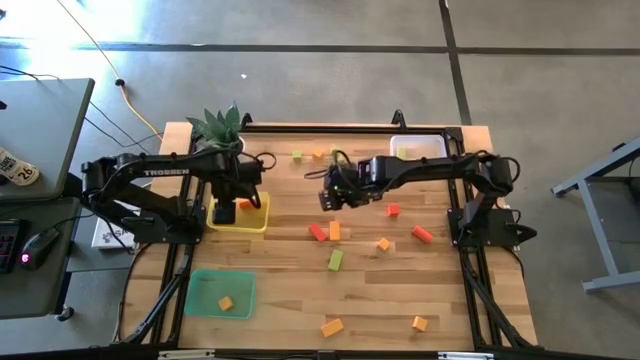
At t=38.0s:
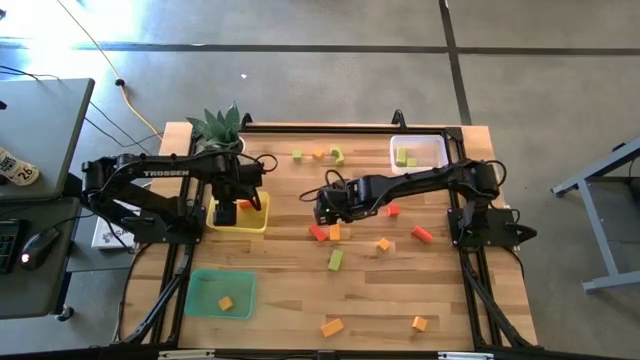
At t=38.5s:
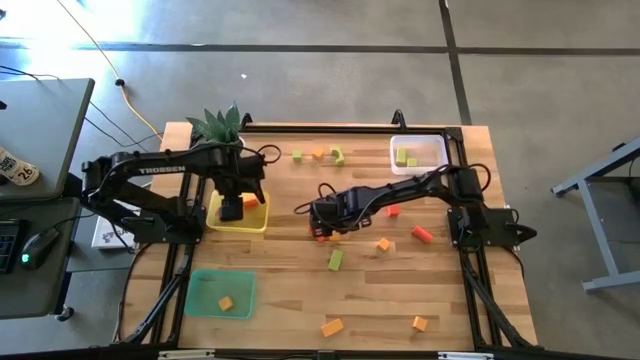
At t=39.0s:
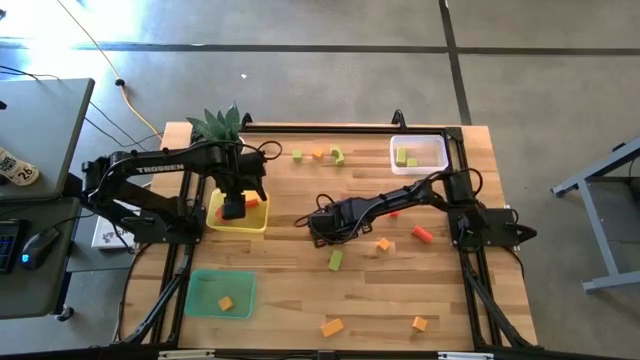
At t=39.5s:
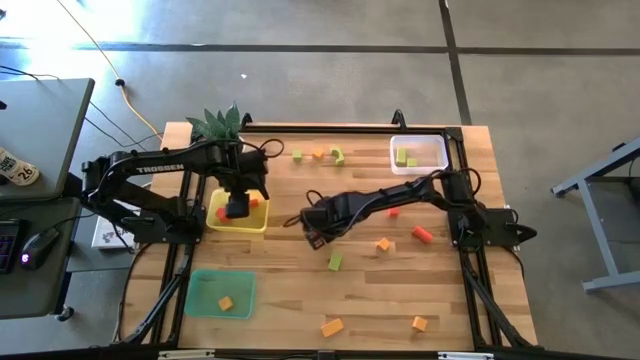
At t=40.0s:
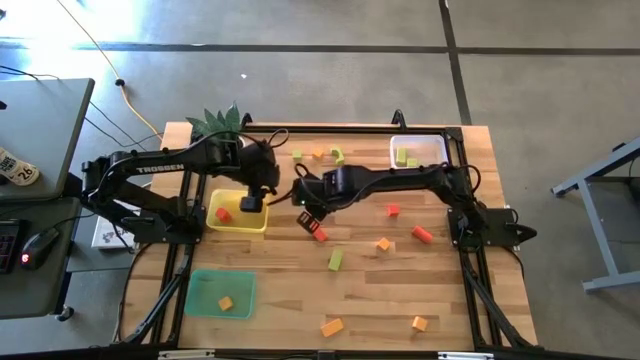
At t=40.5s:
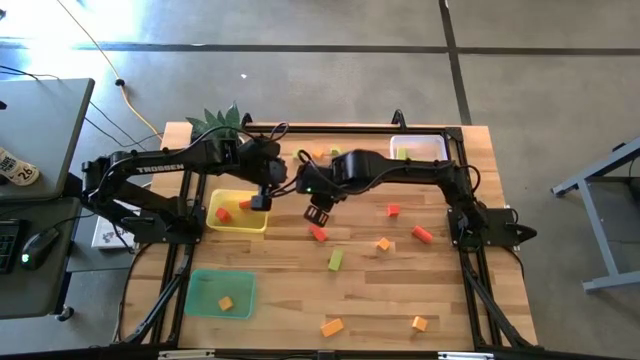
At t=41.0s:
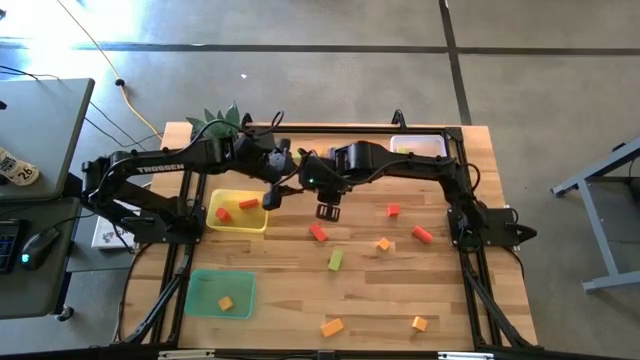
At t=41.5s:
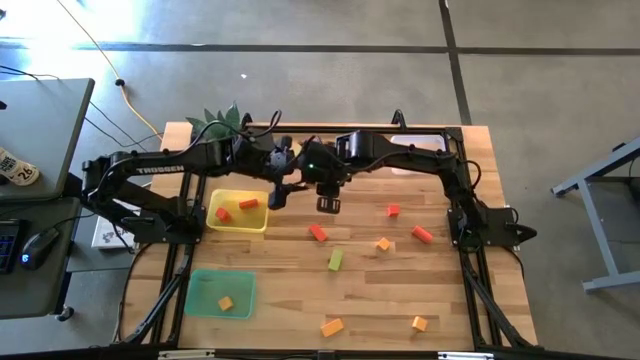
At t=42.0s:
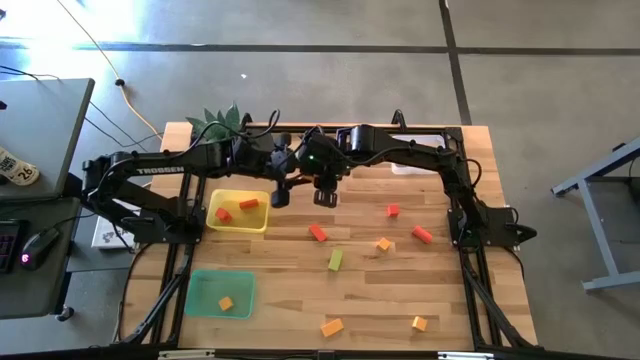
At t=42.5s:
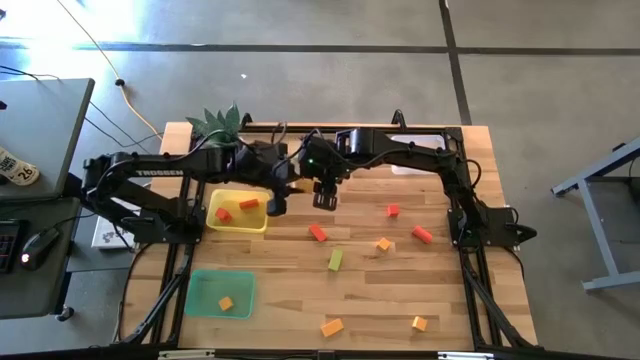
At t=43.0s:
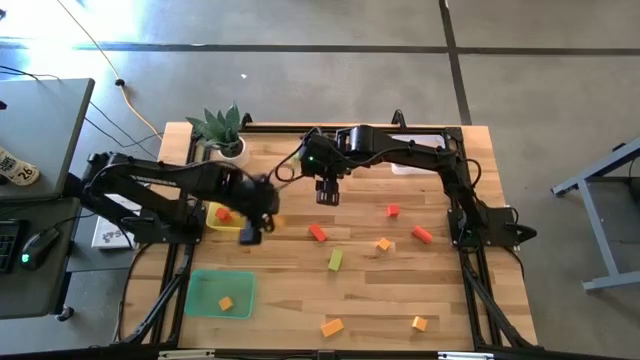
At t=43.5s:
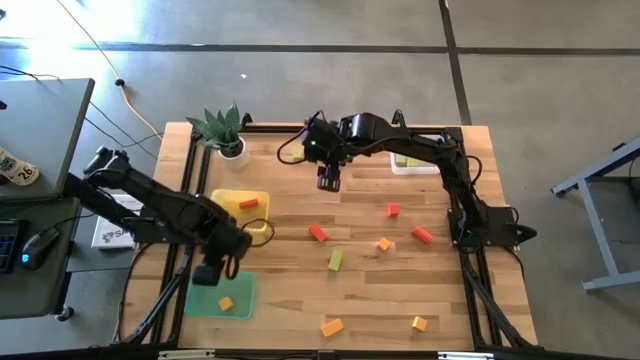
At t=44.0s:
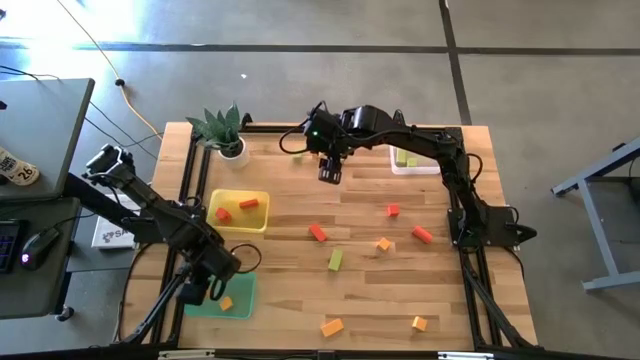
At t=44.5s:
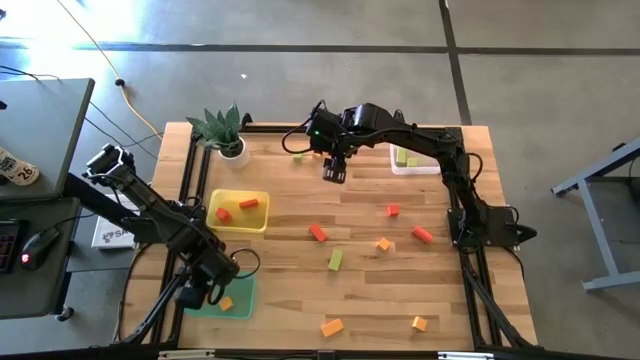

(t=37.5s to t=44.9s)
Task: Sort & place blocks by color
Put the yellow block into the green bin

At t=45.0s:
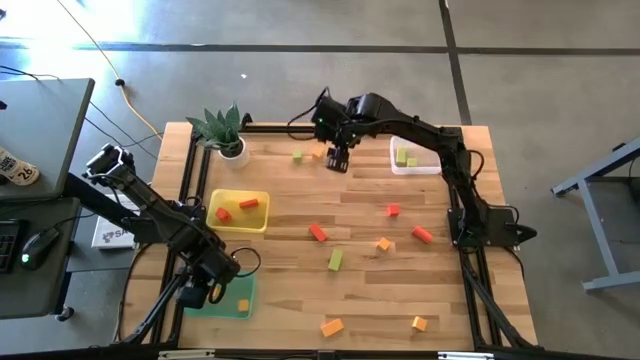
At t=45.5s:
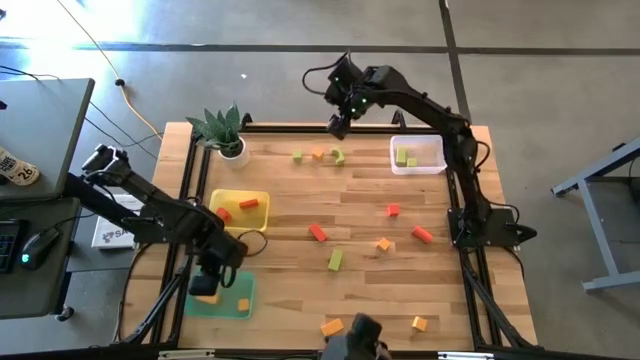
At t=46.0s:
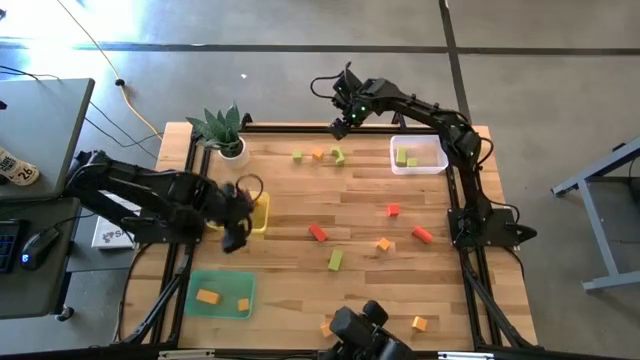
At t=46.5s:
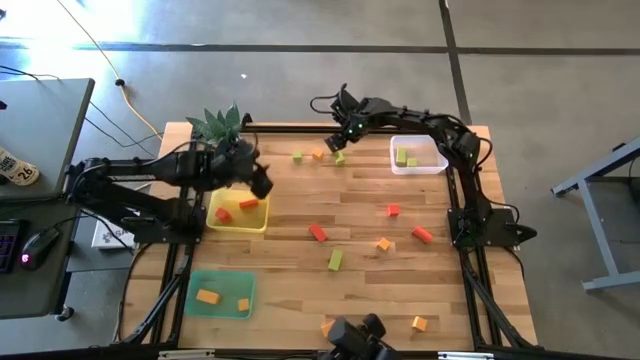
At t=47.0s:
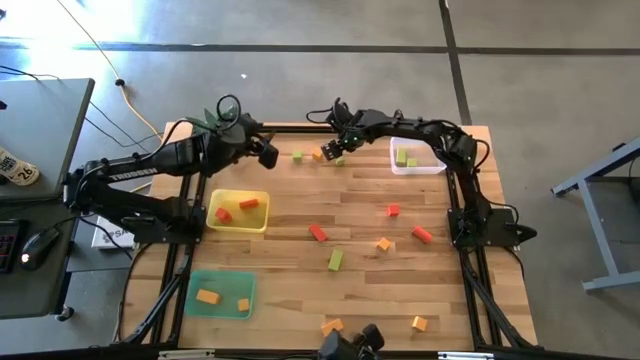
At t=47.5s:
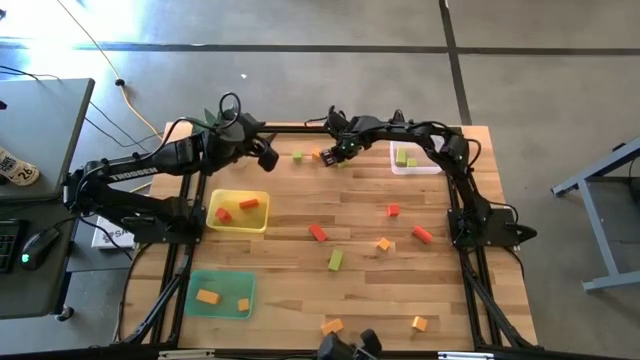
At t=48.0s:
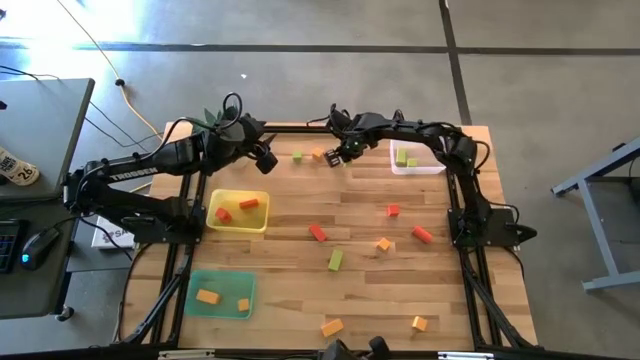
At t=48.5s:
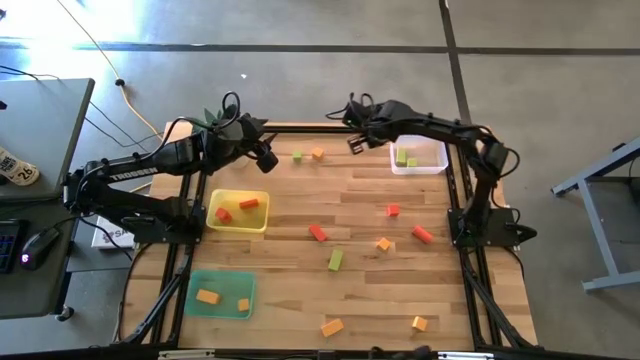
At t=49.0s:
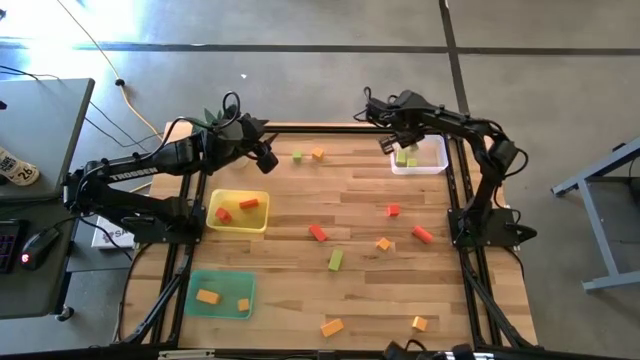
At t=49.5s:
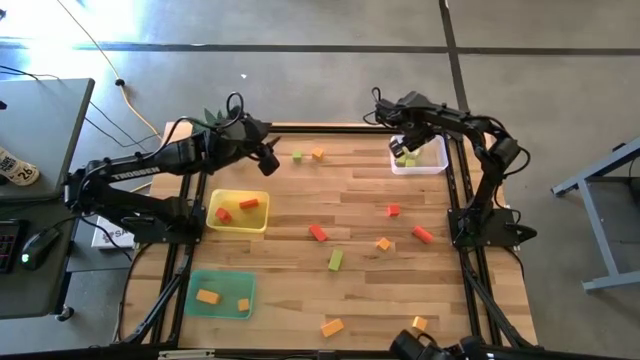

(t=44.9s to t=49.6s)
Put the green block into the white bin

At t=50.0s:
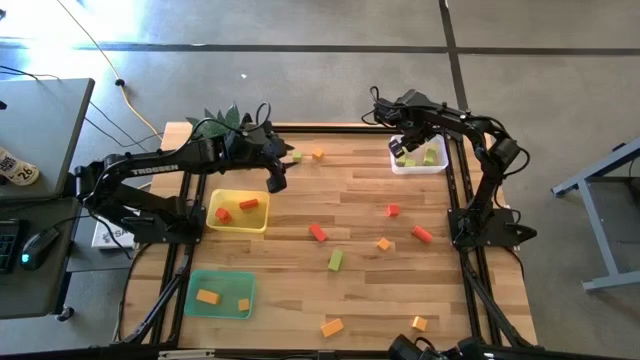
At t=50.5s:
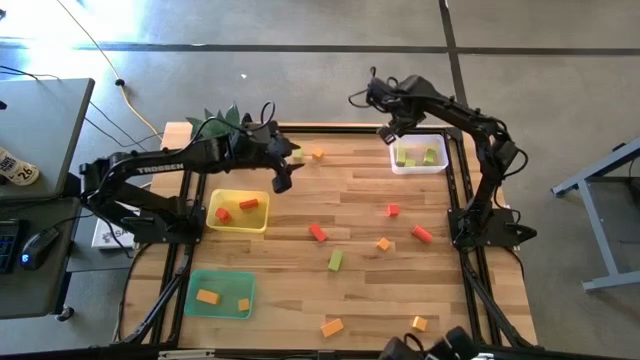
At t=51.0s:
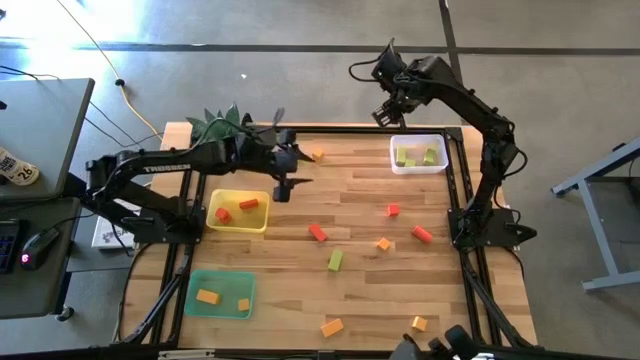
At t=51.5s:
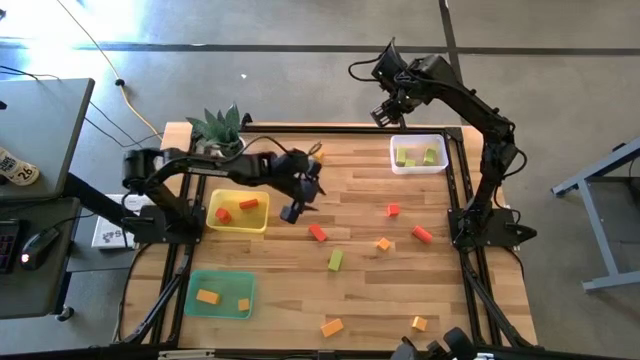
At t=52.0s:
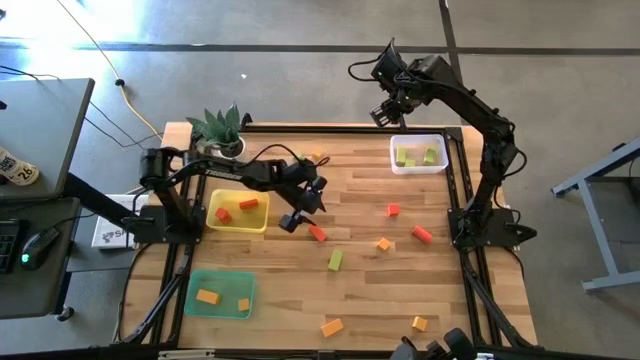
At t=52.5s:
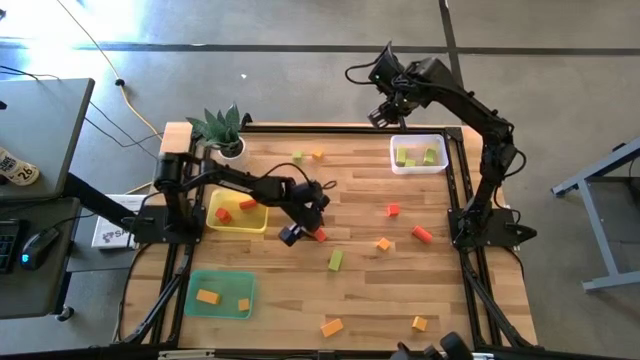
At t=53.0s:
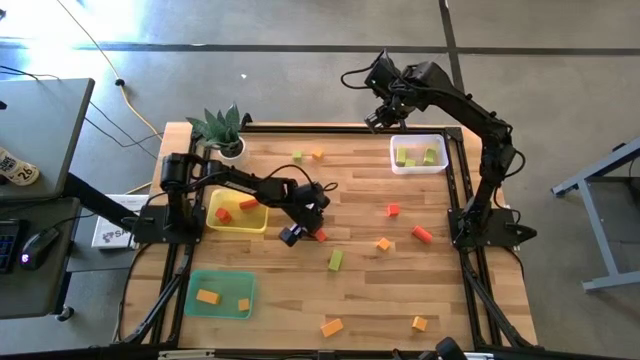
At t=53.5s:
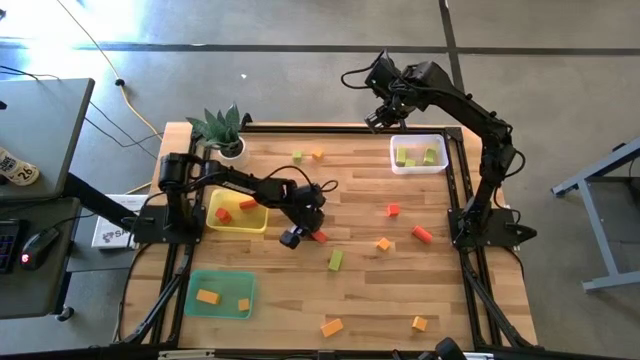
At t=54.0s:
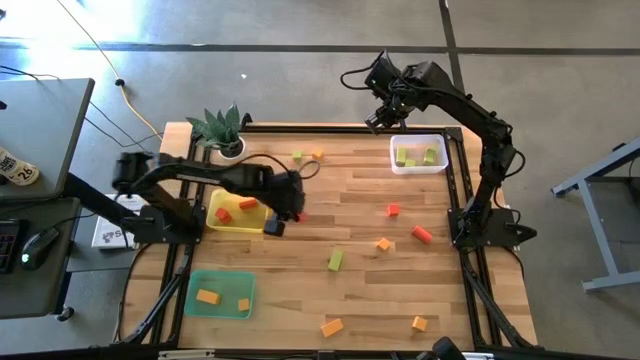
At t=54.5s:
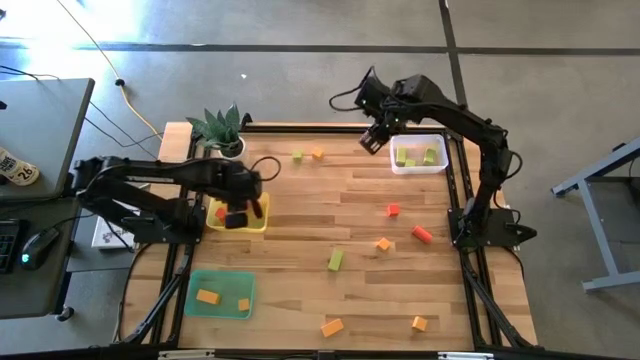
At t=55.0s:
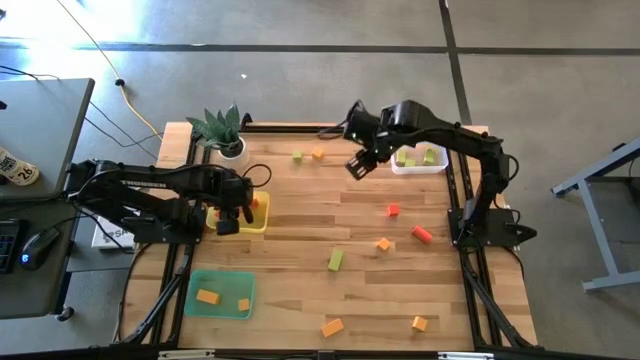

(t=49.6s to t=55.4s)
Put the orange block into the yellow bin

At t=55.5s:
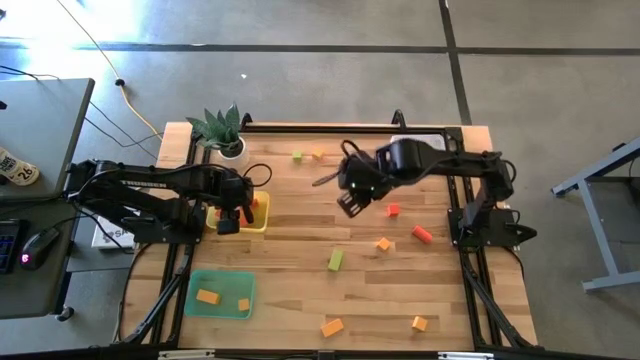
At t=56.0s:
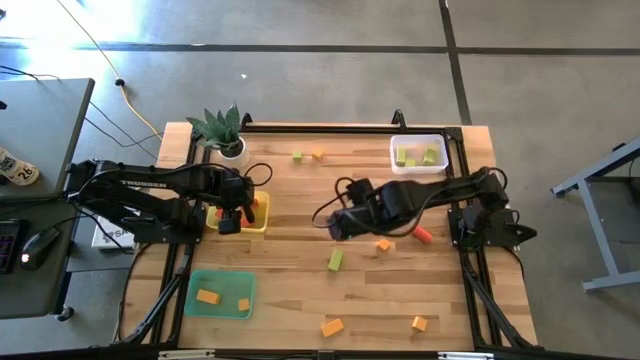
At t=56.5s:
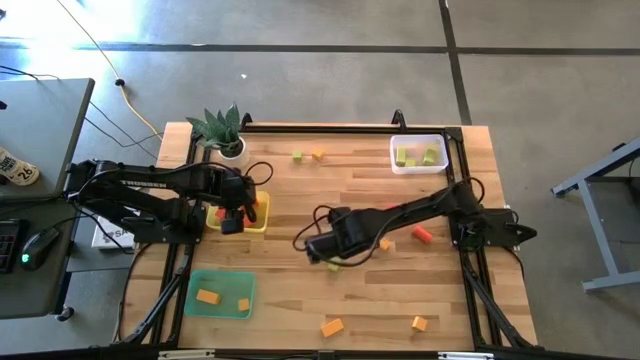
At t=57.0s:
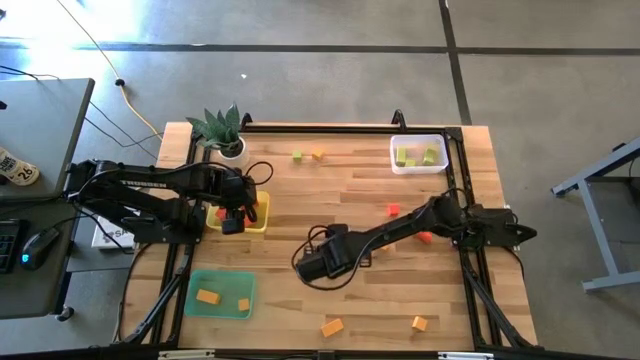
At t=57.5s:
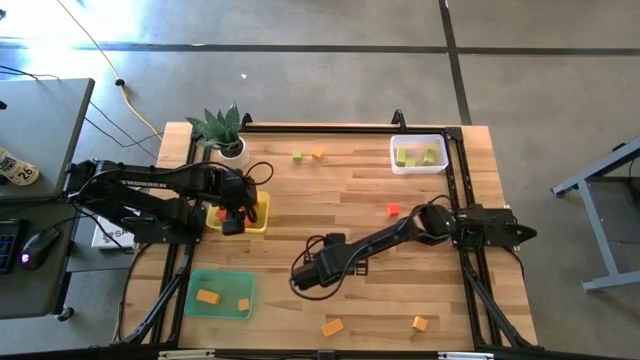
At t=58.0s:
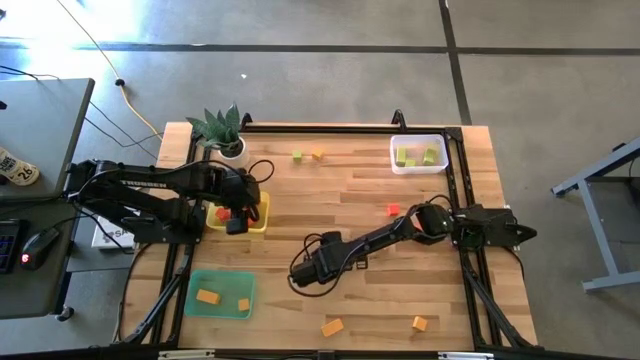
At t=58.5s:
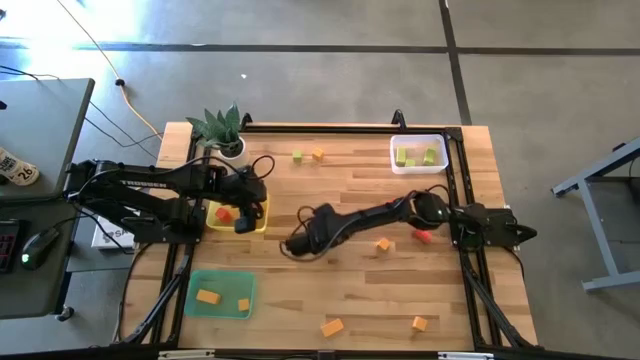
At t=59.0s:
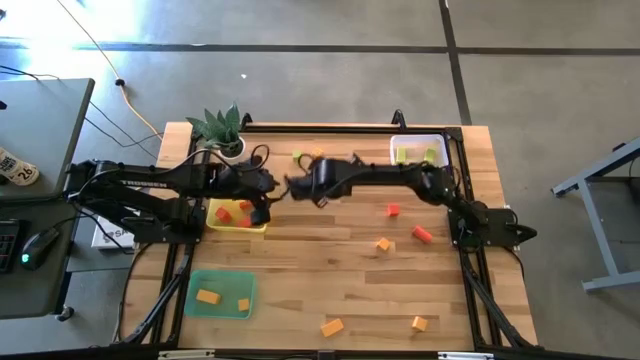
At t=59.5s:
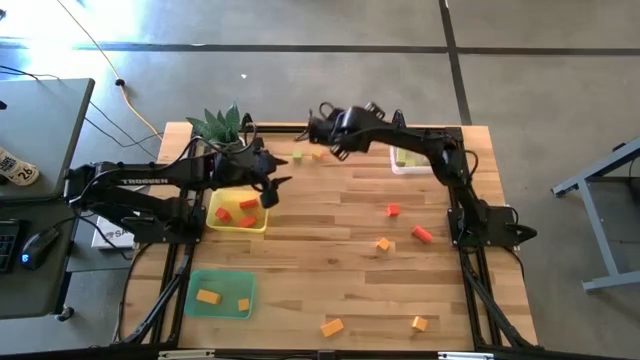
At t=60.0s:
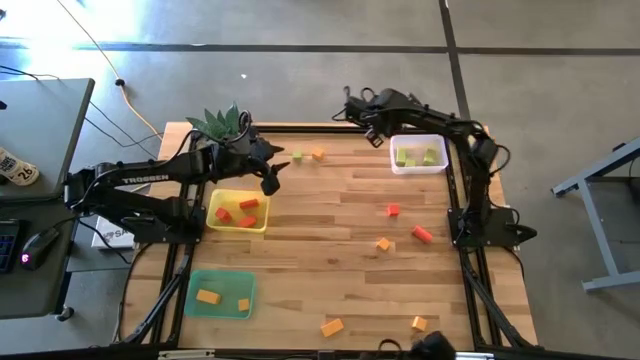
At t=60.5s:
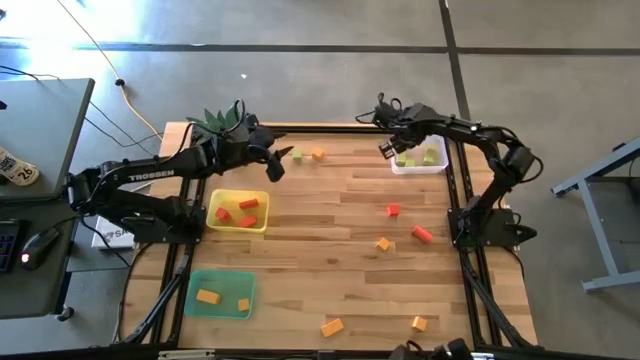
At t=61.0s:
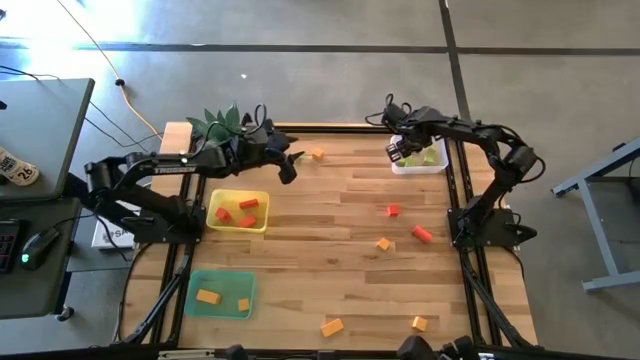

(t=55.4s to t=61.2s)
Put the green block into the white bin
